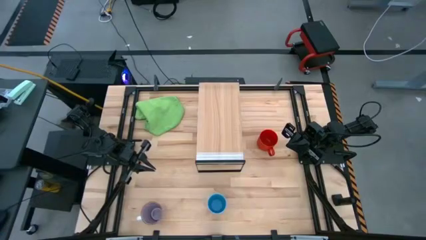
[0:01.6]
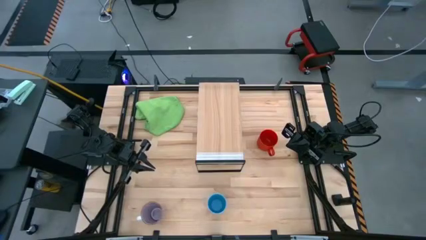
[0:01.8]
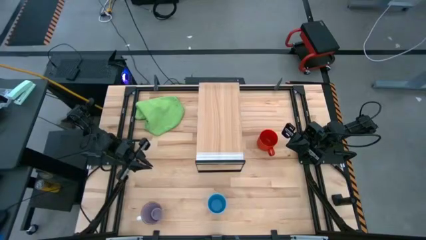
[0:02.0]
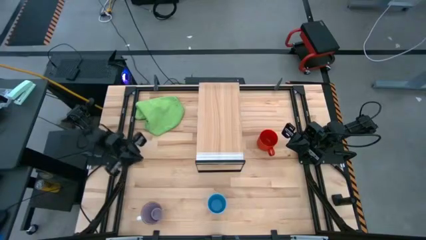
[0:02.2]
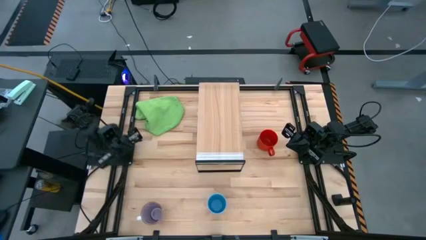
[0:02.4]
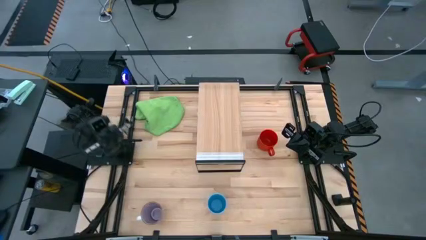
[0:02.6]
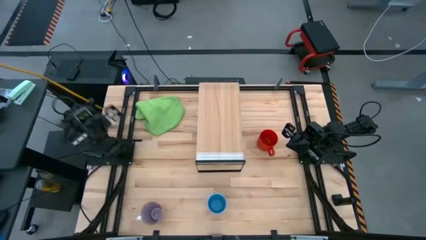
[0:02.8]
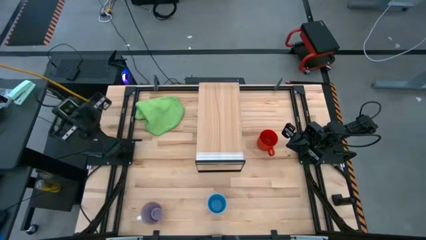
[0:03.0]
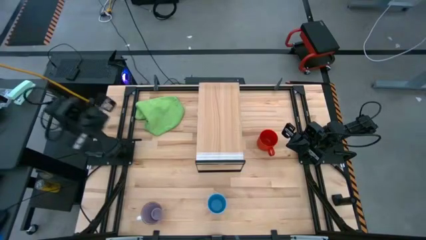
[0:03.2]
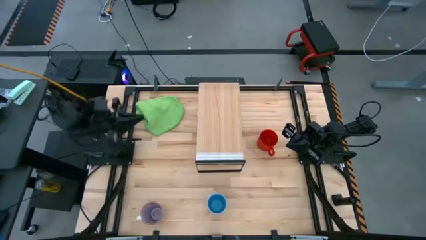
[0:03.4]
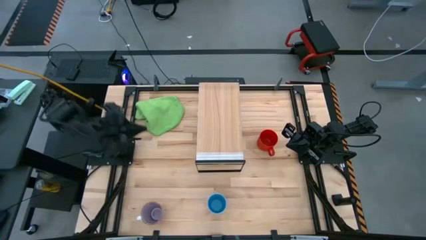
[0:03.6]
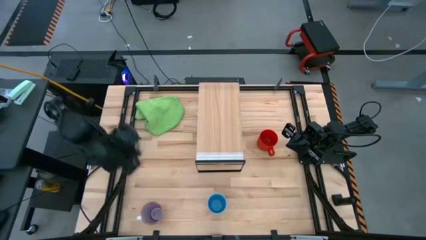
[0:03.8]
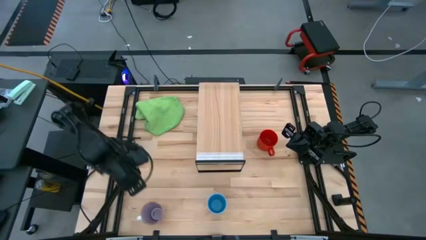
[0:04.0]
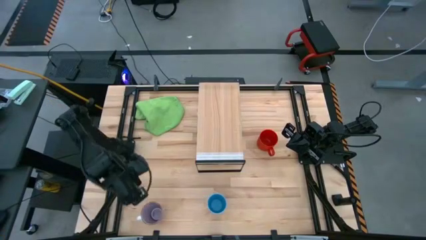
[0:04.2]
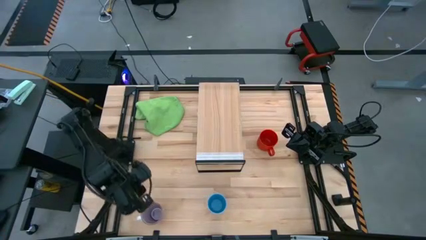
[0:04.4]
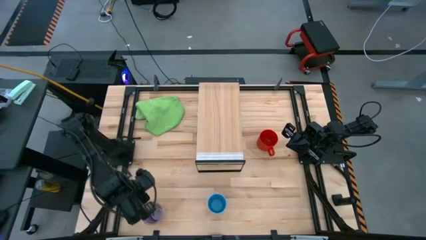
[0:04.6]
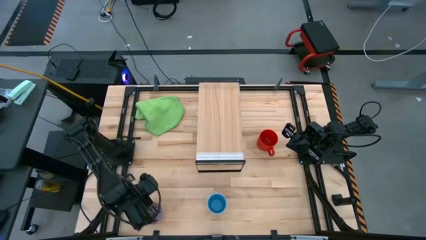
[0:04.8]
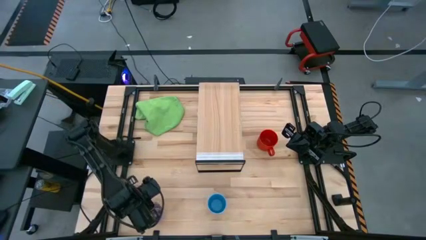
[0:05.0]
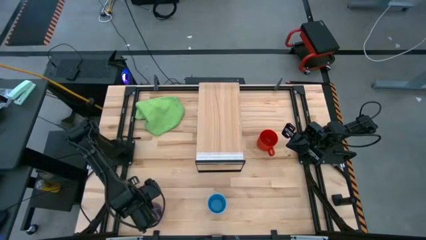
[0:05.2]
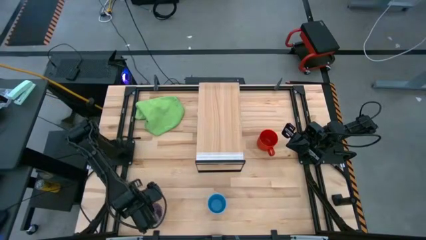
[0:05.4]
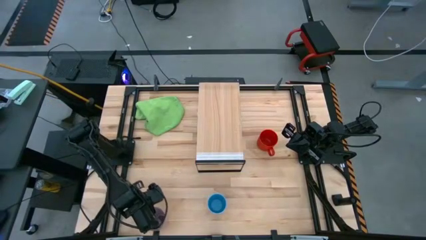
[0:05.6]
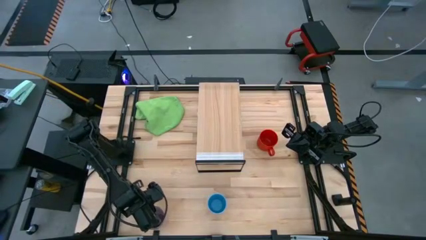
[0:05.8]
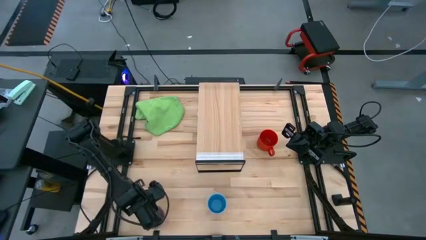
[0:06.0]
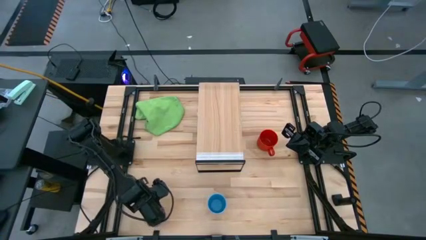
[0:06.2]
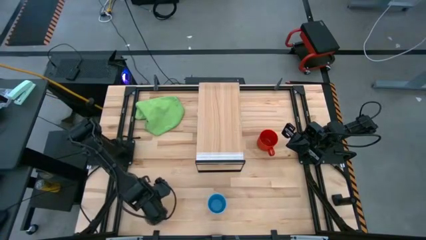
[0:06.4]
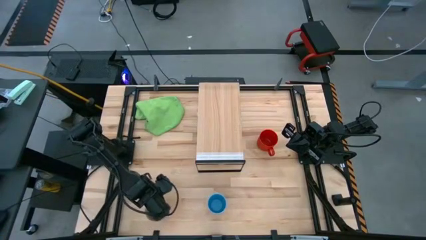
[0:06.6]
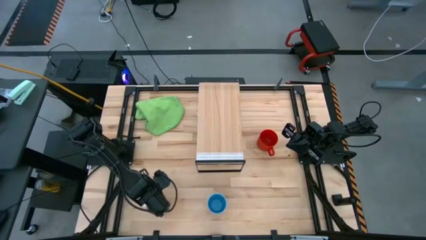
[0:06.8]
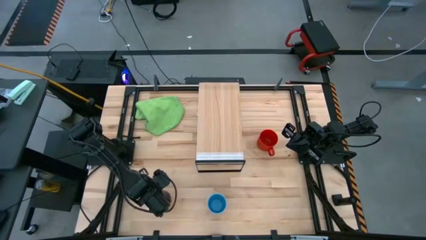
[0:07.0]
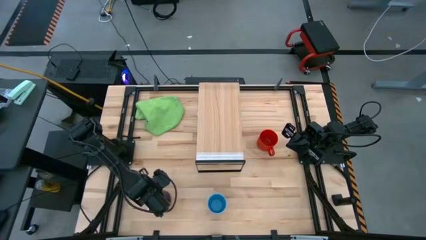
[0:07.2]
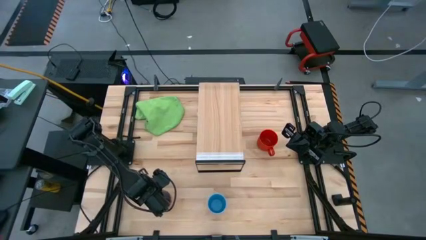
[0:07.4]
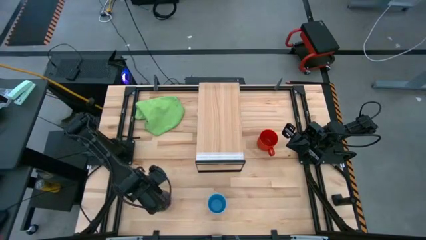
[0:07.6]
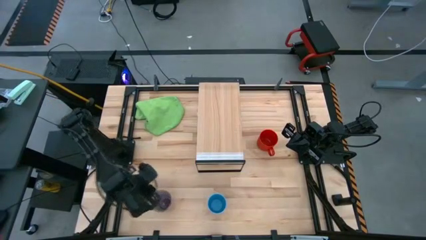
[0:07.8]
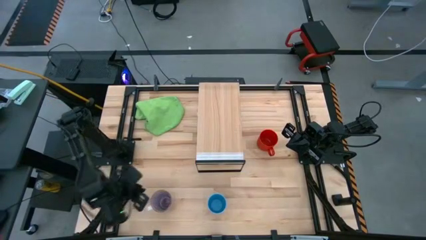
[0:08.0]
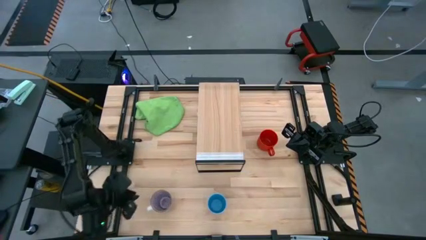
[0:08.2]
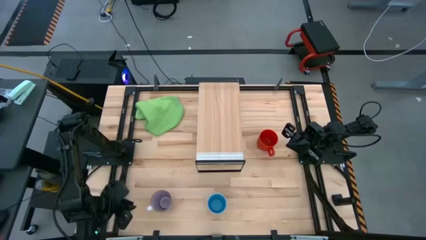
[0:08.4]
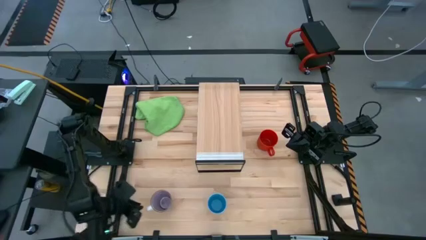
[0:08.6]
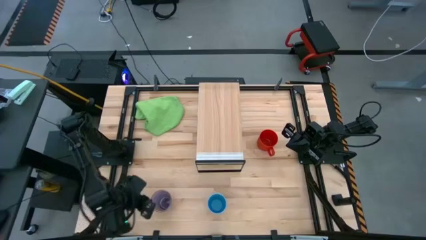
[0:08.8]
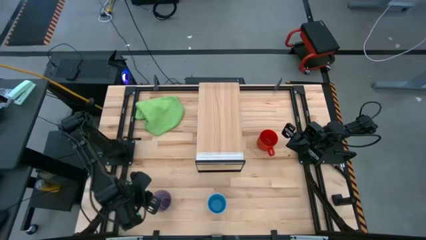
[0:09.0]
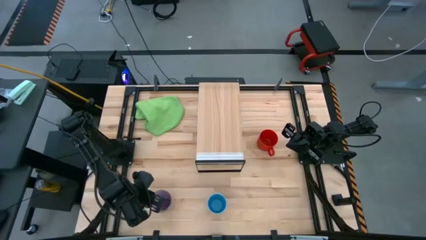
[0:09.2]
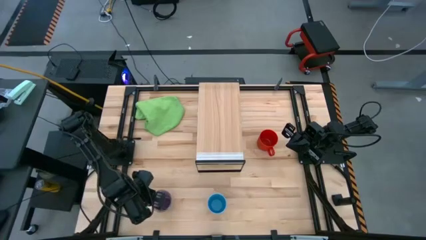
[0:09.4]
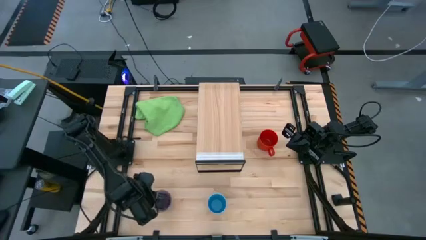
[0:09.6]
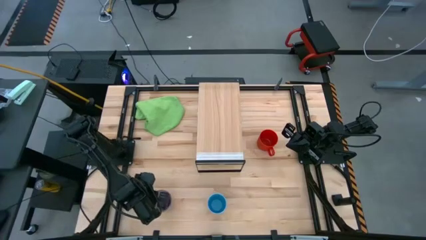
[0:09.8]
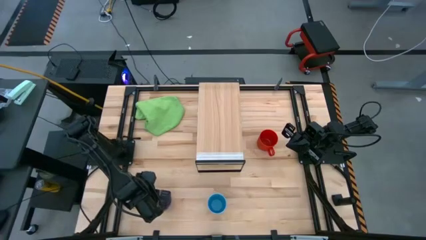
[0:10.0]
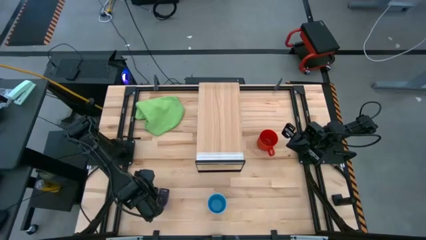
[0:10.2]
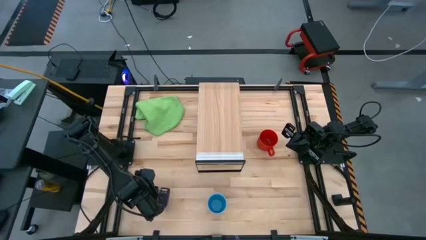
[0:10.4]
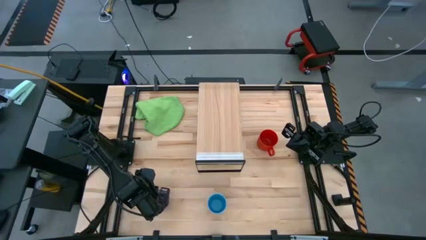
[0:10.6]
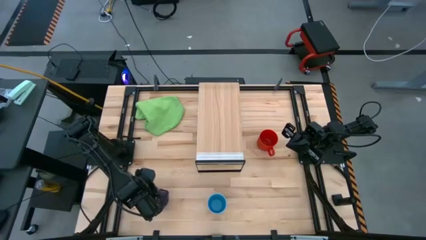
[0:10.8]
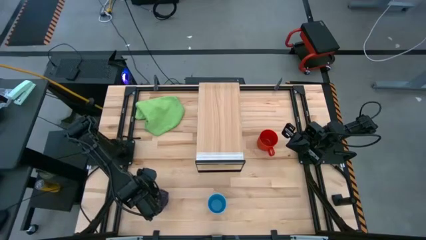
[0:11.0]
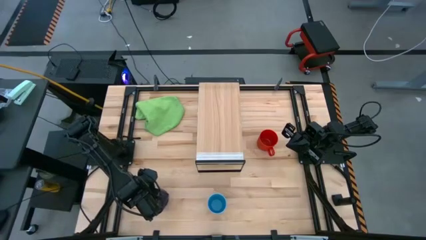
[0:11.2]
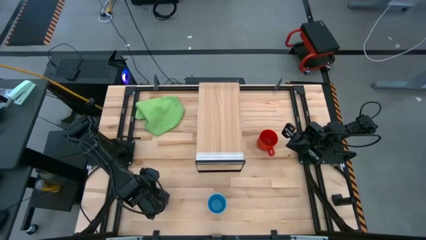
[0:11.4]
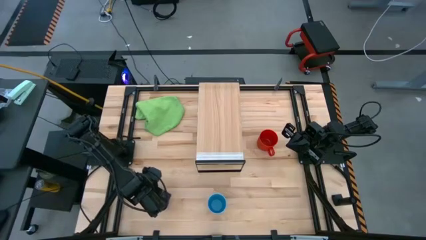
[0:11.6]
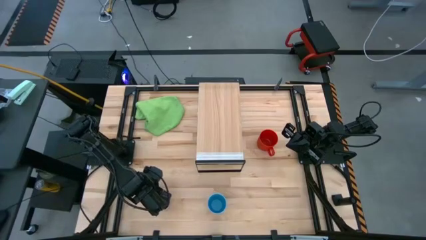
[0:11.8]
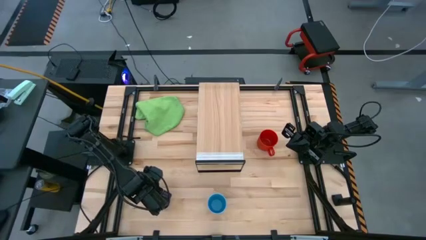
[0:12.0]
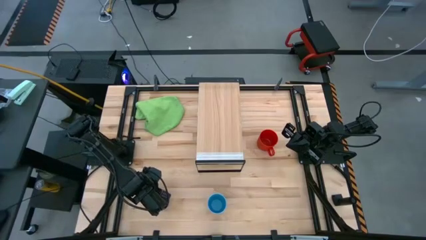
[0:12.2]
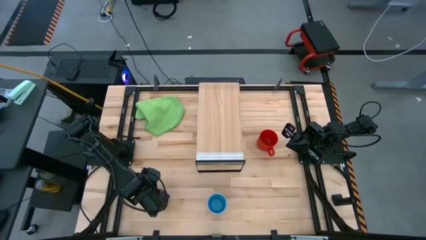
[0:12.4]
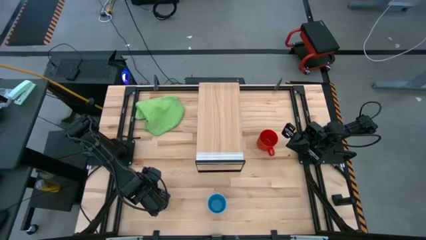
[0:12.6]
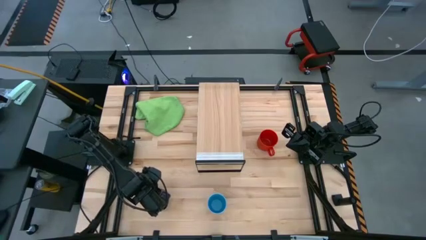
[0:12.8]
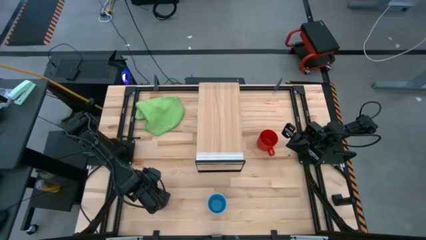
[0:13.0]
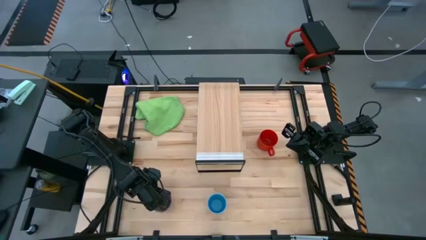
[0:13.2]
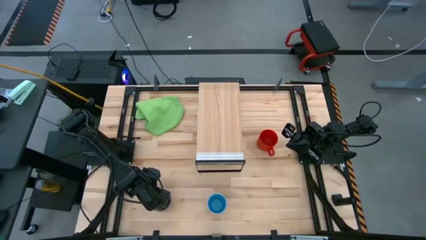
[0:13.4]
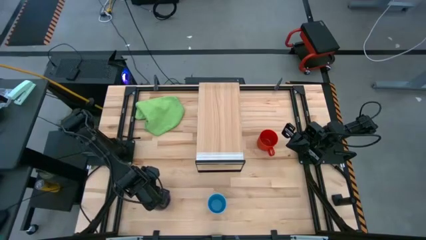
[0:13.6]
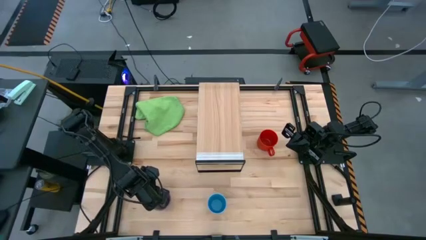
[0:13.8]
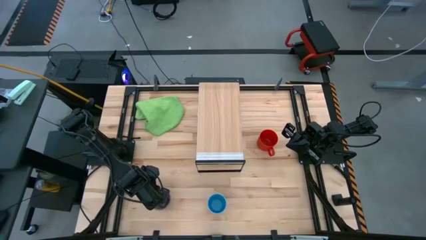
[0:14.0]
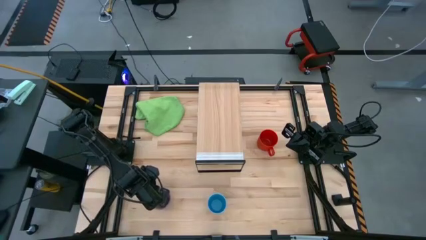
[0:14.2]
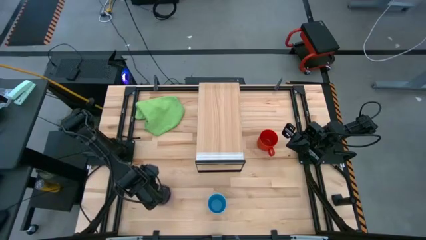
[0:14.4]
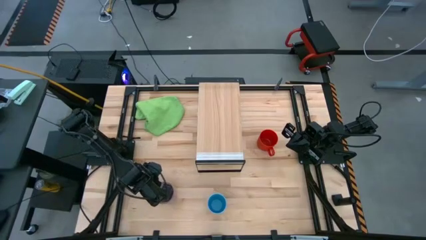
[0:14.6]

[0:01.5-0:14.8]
Task: Stack small to large cups/mugs on shelf
Put the violet mug on the shelf
